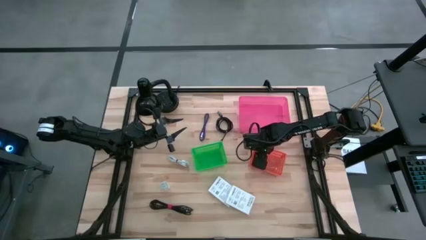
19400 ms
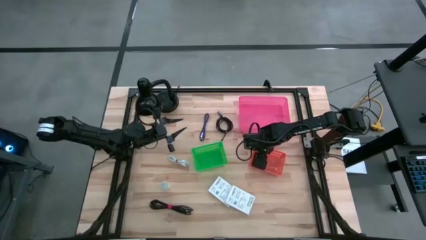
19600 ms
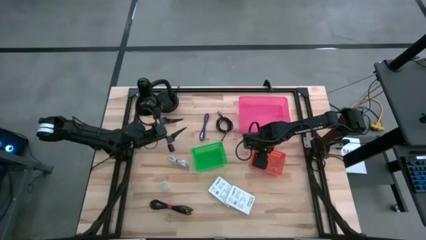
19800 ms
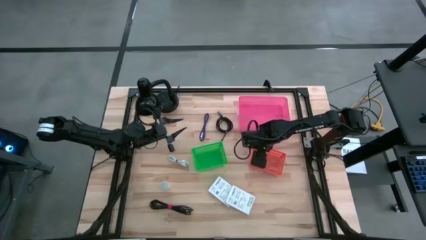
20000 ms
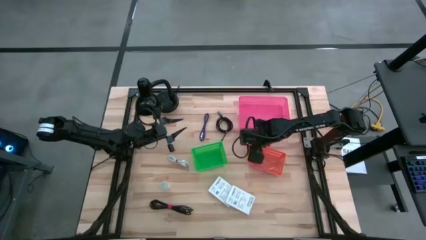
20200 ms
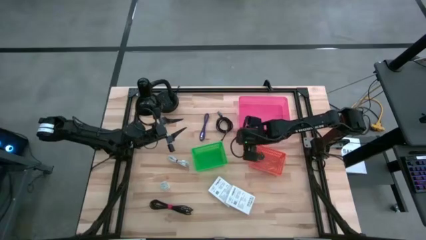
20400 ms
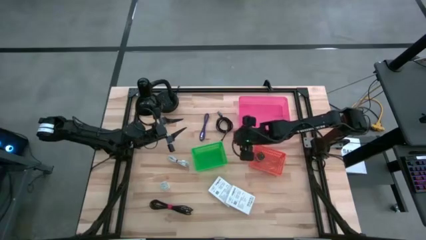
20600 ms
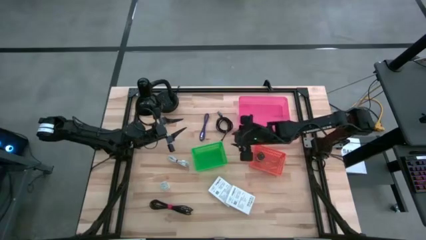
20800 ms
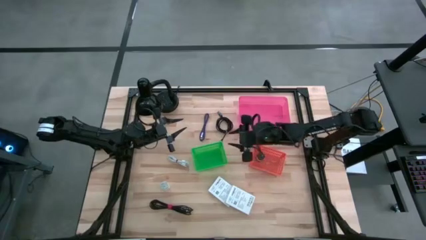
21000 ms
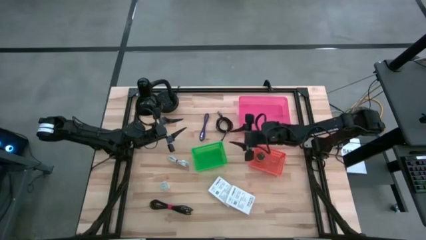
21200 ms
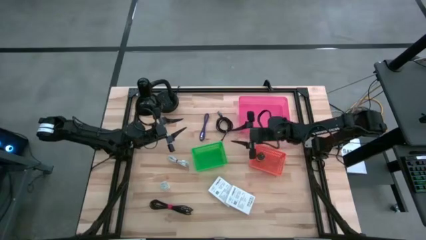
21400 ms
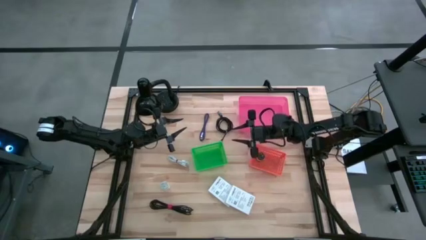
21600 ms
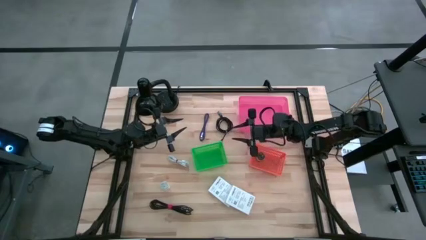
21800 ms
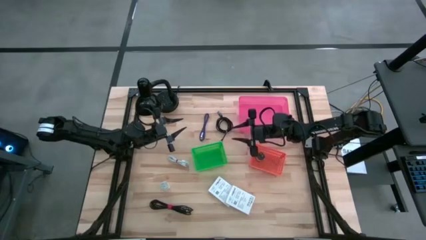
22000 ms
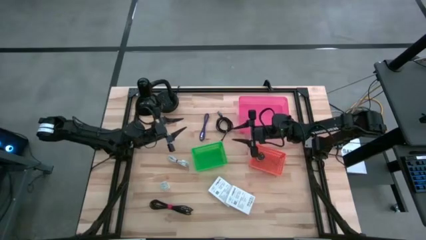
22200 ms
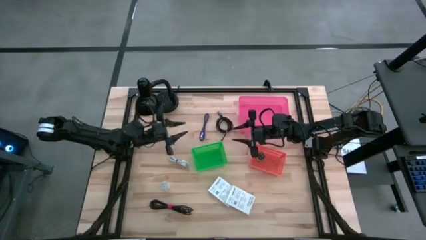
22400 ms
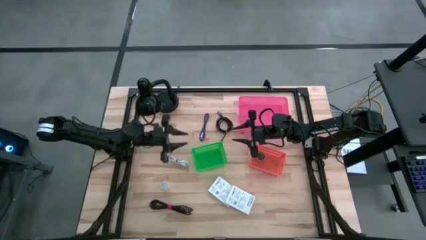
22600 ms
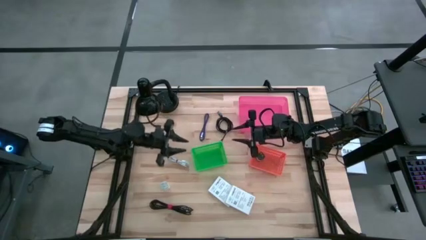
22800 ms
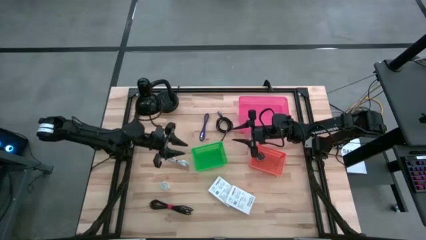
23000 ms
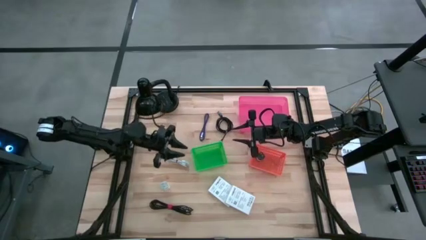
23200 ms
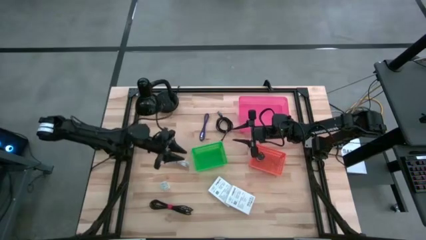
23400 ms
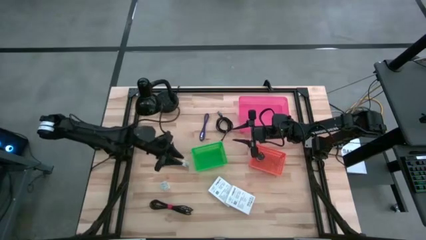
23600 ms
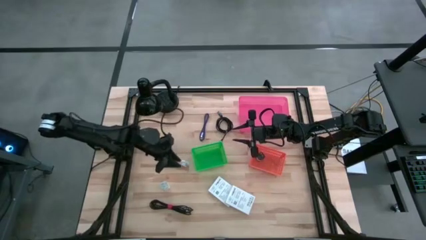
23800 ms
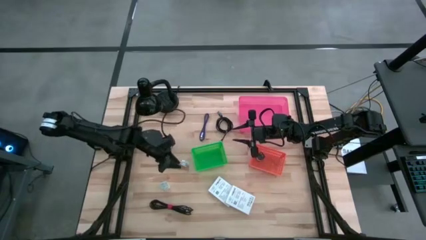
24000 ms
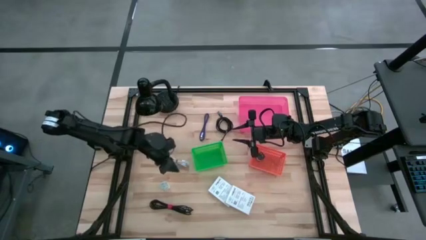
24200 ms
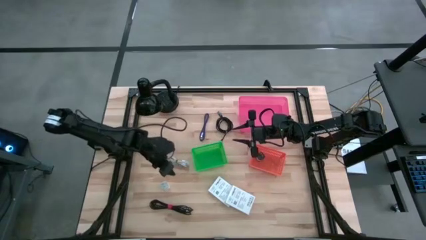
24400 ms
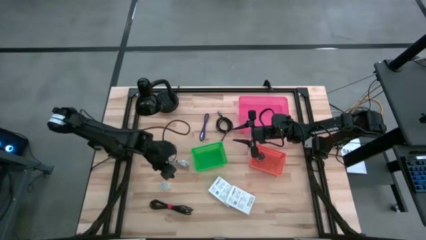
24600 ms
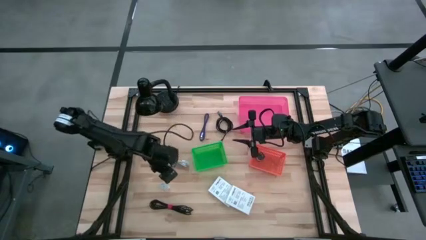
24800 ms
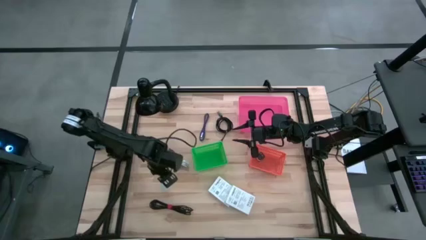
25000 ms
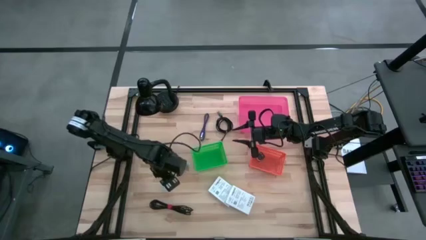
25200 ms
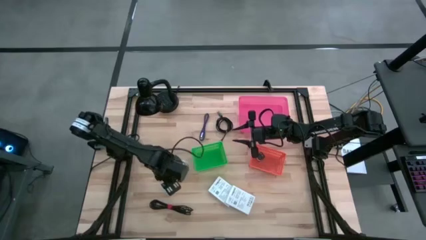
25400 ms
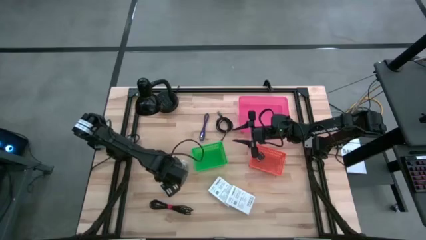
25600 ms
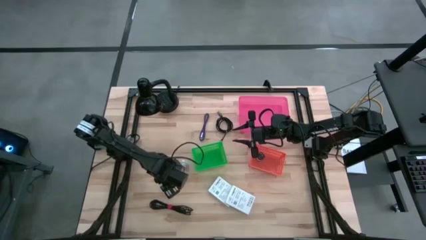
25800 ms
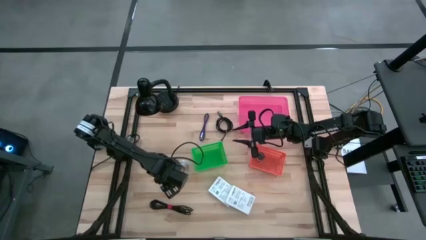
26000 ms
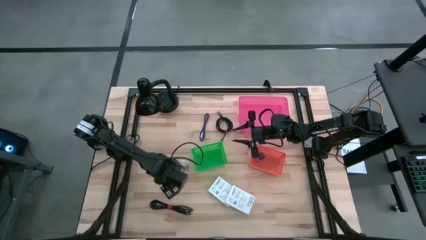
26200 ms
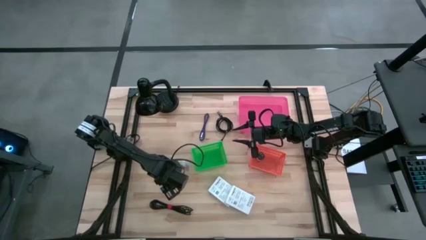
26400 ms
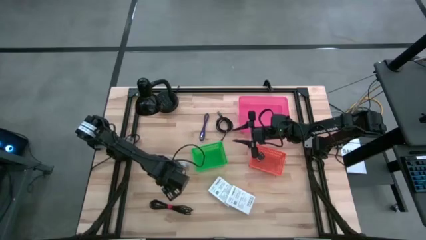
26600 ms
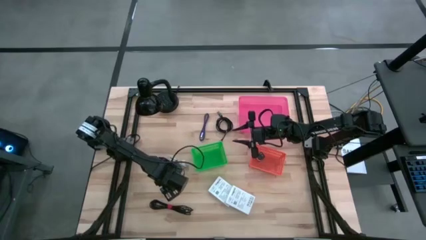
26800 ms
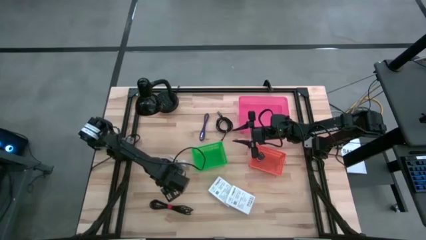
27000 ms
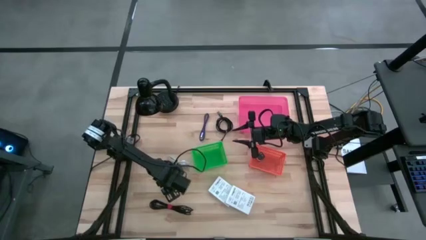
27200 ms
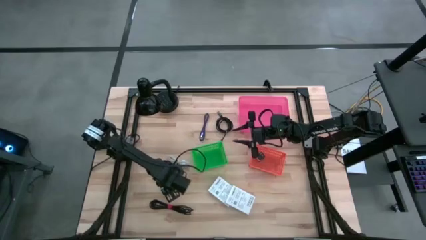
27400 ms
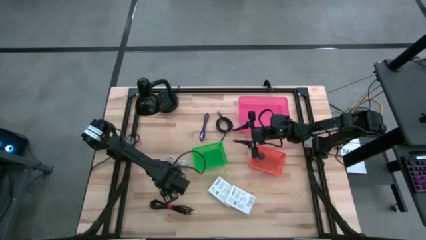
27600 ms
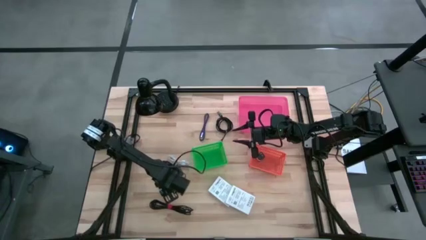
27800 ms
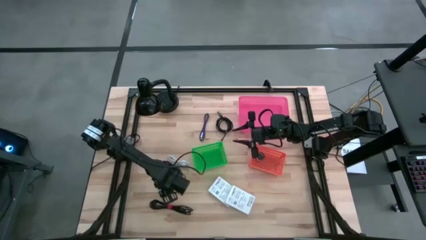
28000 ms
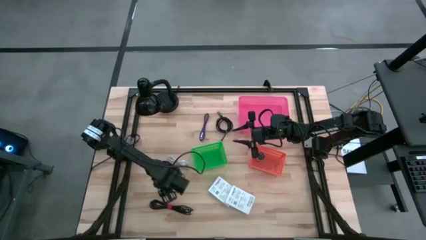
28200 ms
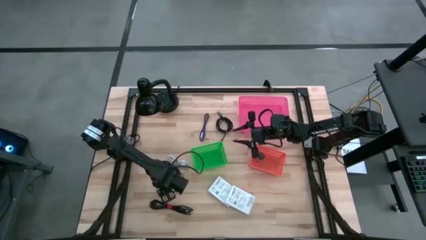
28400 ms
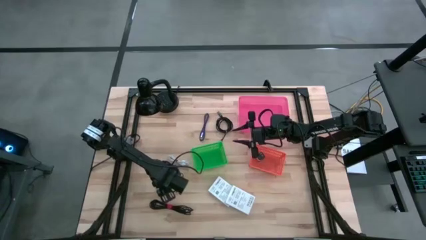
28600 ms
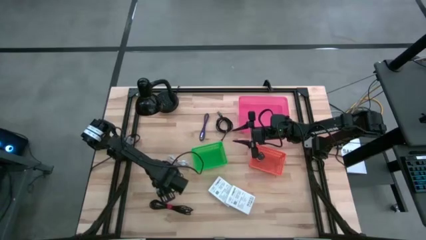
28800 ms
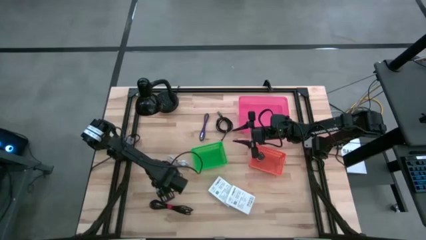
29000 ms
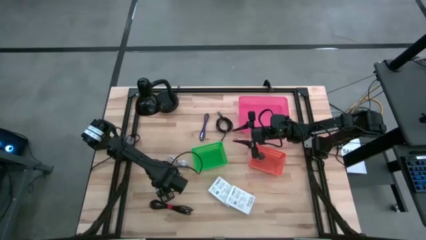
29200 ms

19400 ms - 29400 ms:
Task: Pick and place items into bin
Put the white charger adapter into the orange bin
